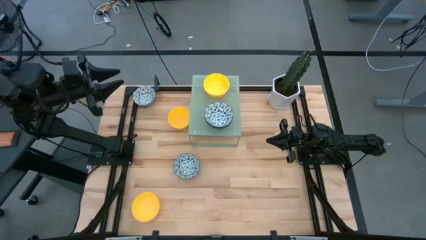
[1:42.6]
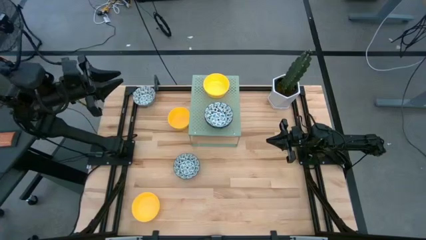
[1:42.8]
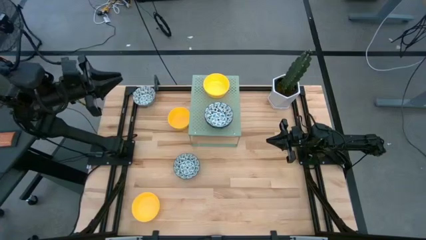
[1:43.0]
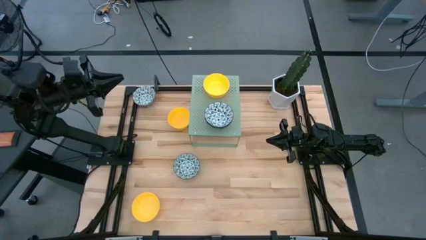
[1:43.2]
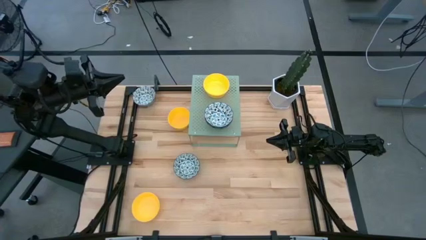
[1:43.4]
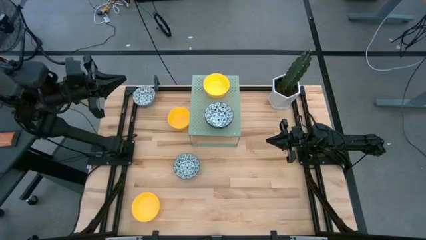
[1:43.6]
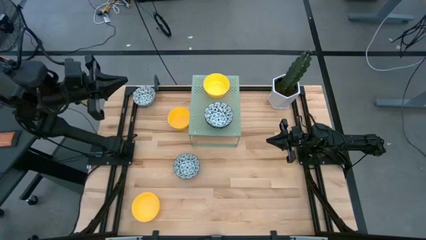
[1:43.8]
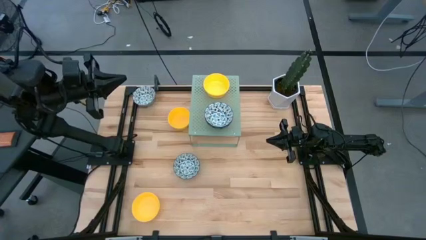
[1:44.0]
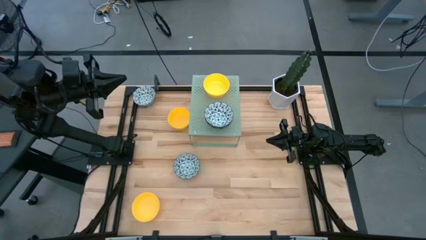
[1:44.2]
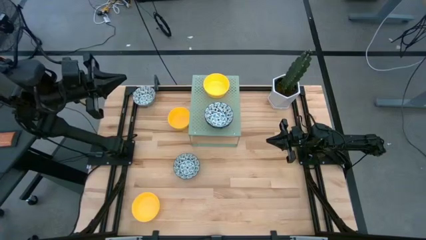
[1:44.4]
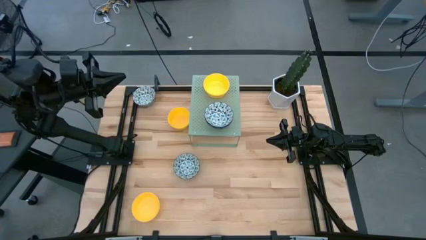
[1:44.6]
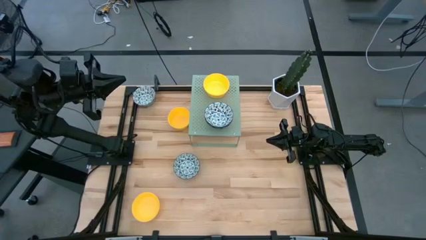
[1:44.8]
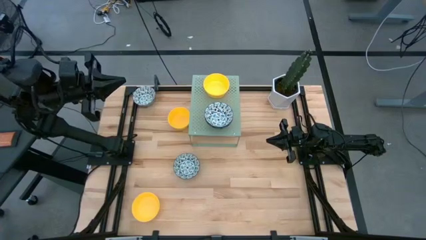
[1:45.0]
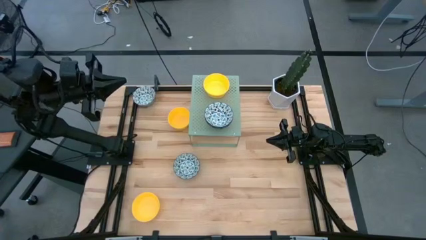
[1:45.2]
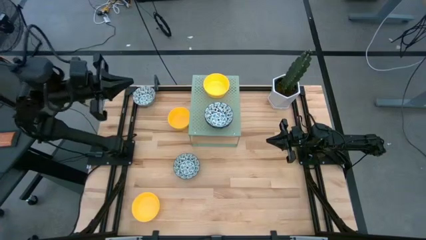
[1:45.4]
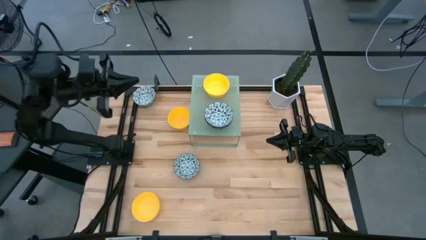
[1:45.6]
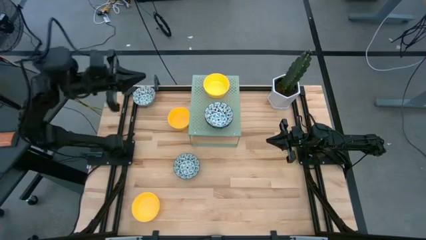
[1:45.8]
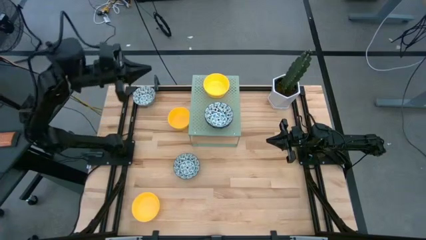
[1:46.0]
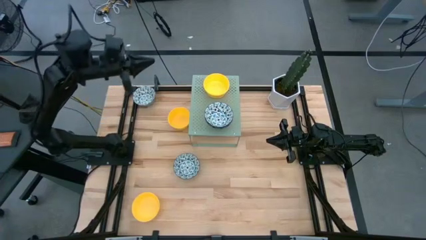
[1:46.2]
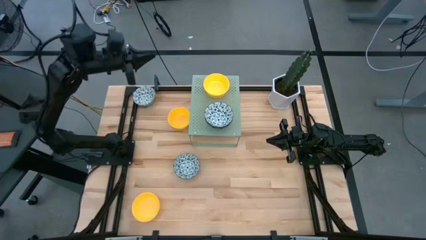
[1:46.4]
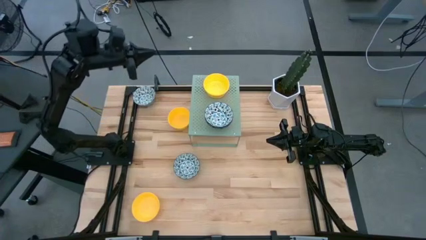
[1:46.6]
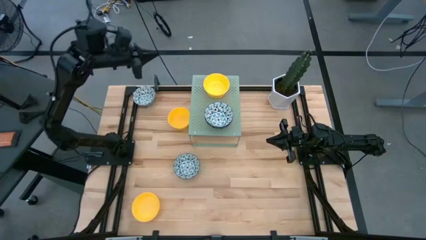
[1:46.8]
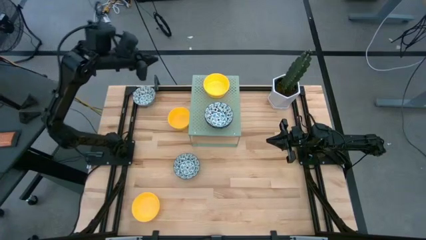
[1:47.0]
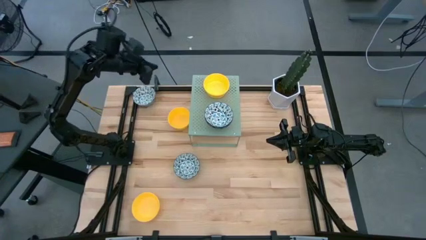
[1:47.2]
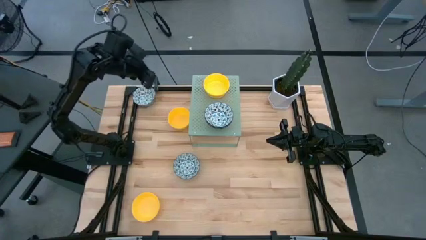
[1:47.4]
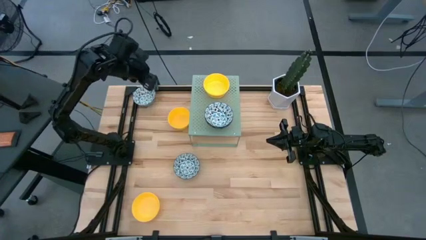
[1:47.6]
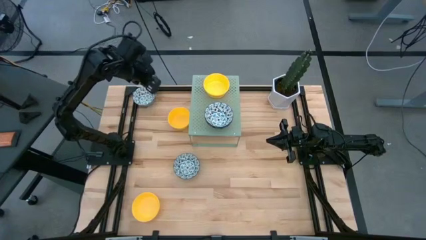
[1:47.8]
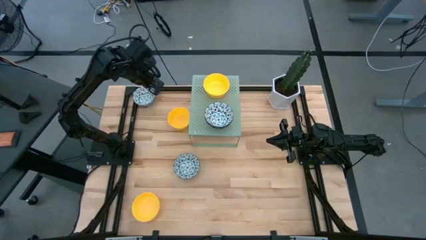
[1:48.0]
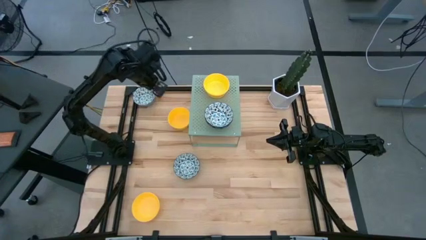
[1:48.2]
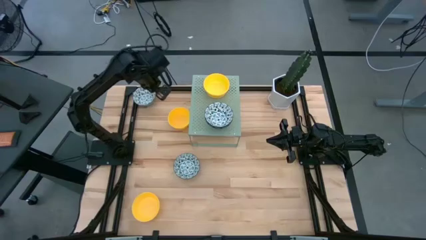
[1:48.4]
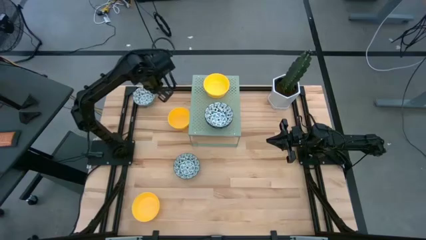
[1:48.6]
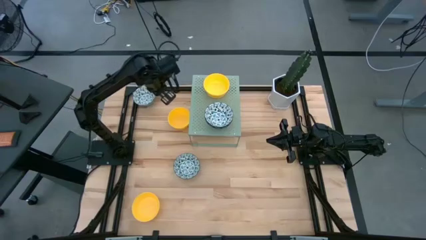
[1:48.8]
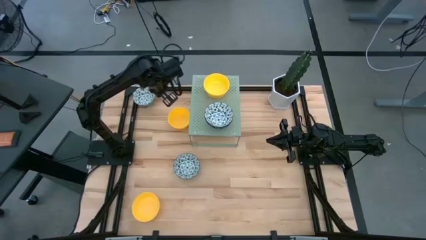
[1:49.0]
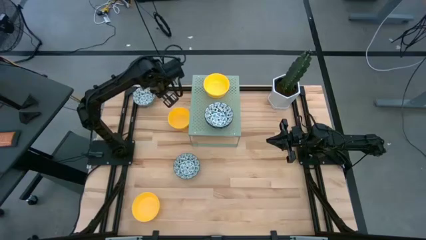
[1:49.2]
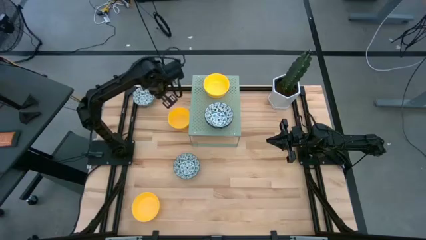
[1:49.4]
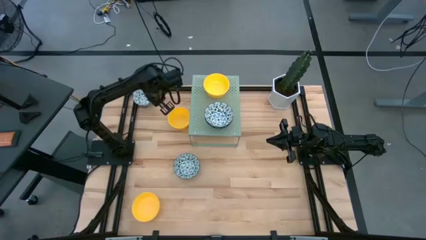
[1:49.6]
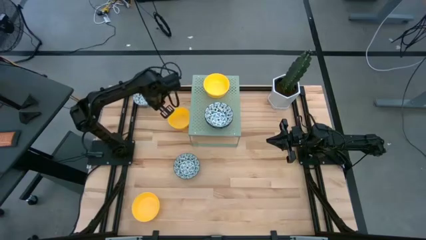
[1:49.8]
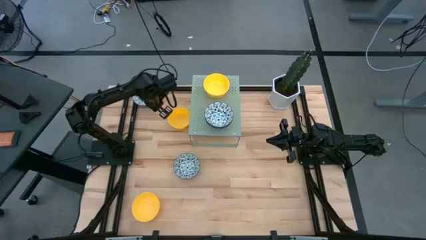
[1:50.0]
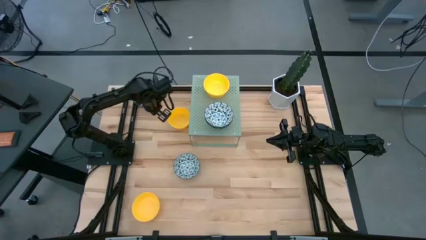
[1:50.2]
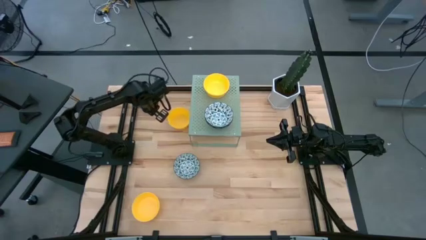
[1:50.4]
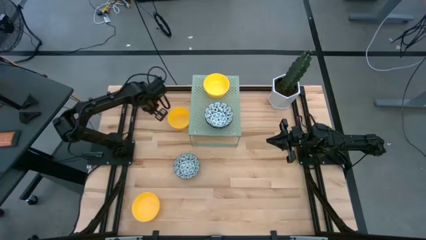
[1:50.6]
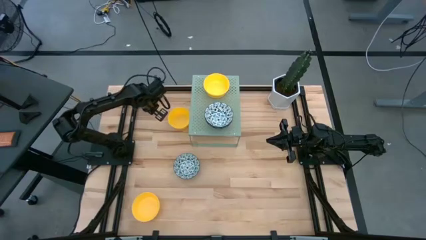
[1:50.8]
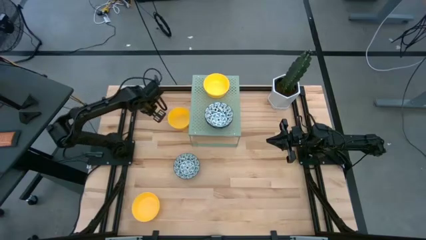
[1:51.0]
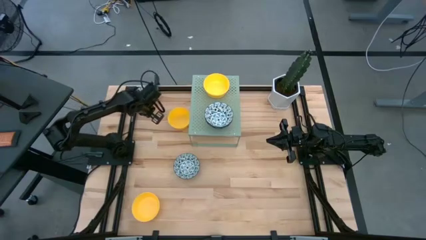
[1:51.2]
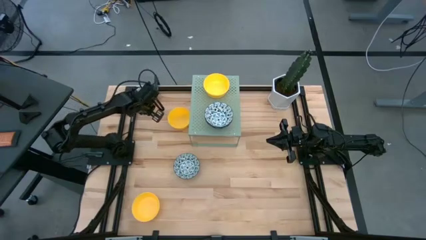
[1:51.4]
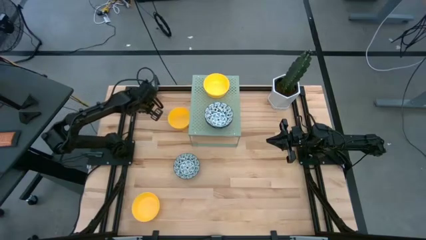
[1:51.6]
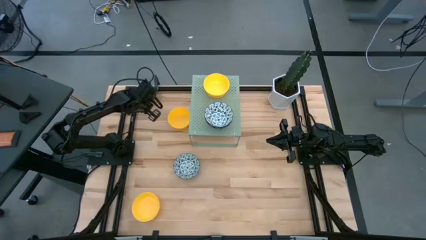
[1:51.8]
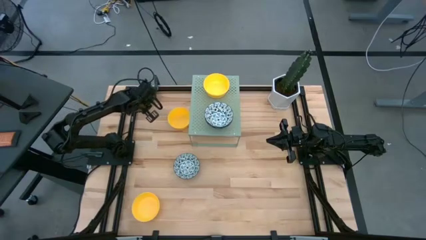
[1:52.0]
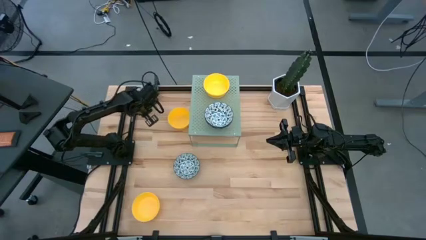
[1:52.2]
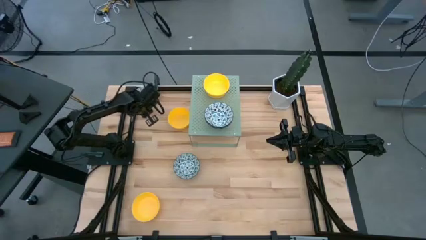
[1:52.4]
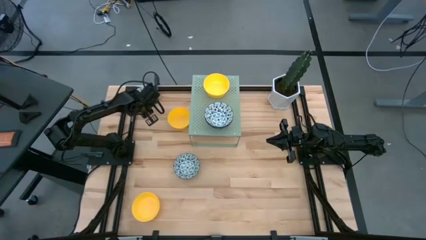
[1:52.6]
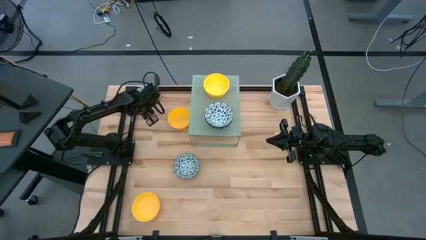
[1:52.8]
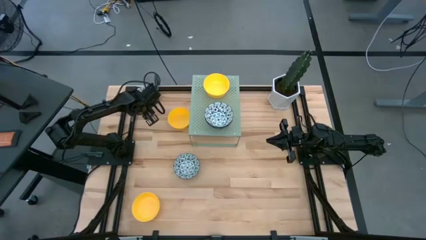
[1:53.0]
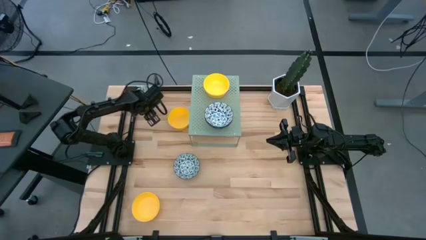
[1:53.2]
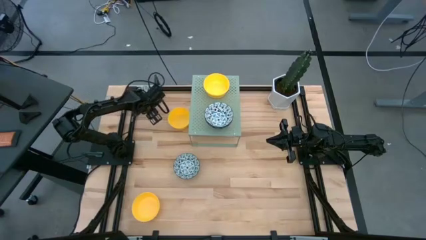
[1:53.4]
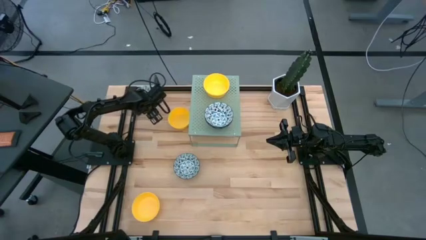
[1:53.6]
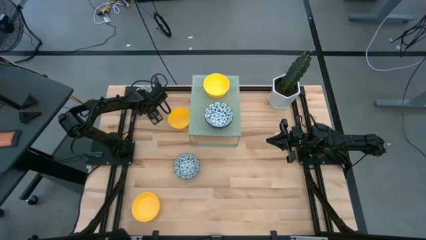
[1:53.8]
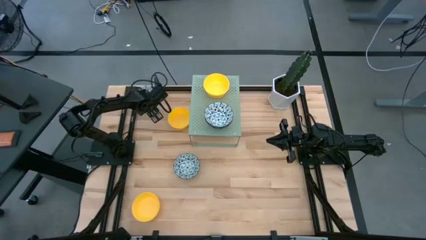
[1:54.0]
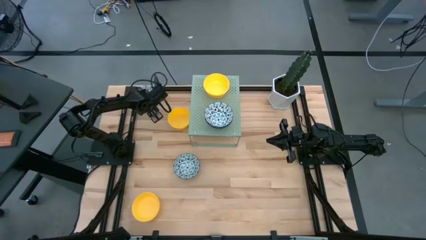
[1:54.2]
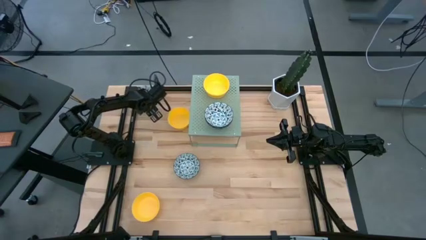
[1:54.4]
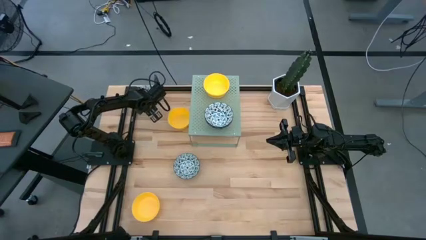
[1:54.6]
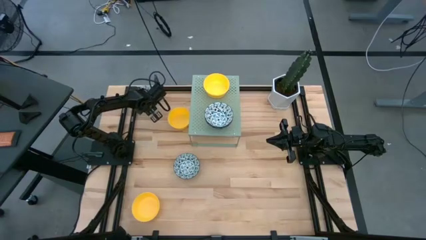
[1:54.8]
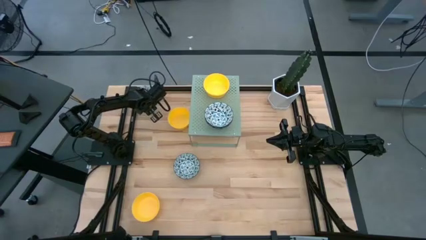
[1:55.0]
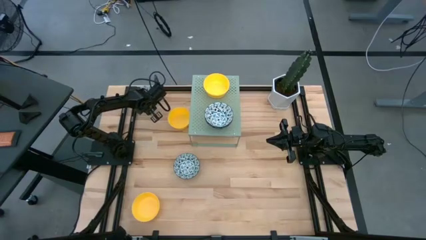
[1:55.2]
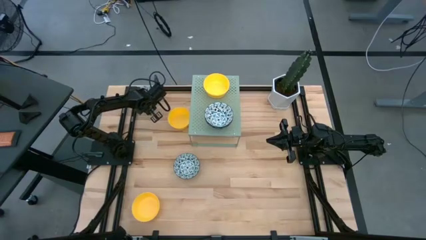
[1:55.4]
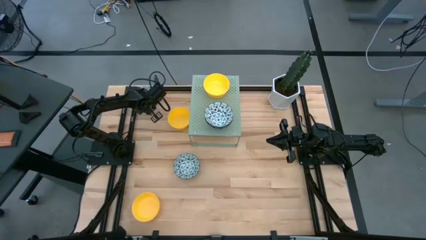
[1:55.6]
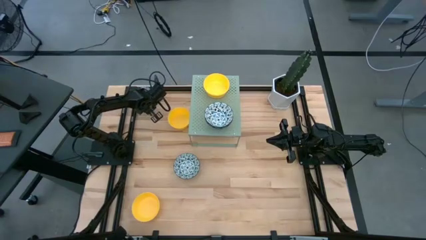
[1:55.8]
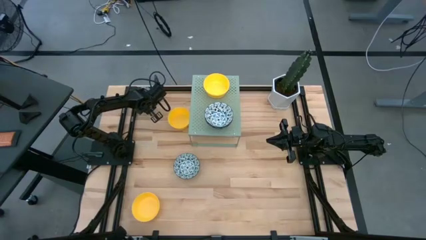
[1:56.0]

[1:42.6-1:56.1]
Task: Pick & Place Mini bowls
Stack the blue and white bowl on top of the other blue and white bowls on the shelf
